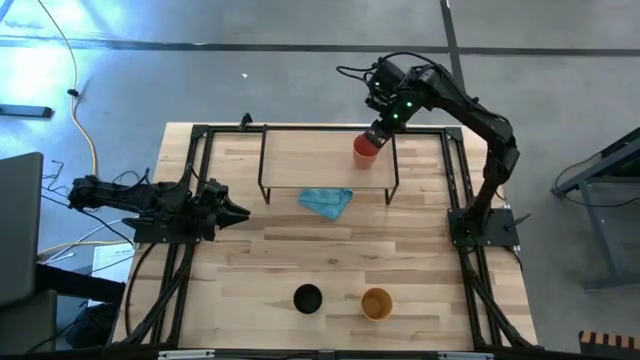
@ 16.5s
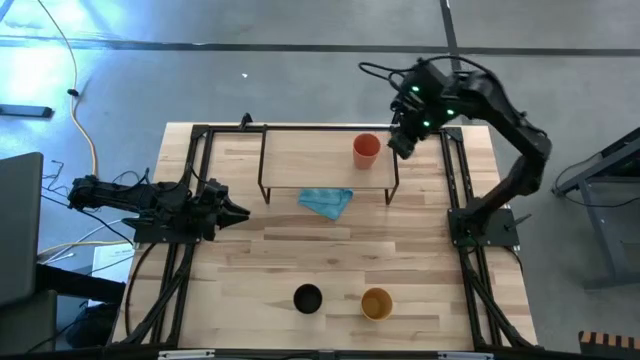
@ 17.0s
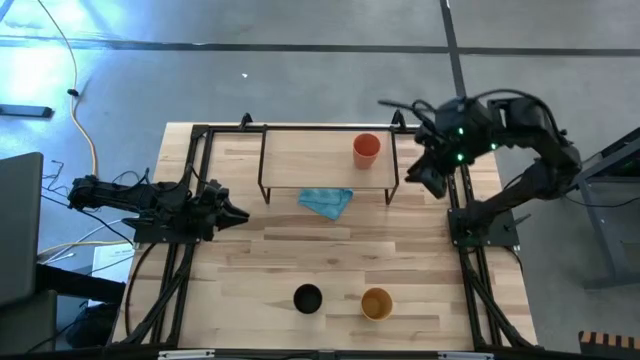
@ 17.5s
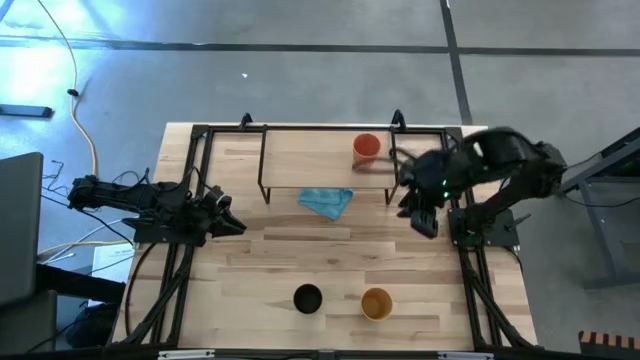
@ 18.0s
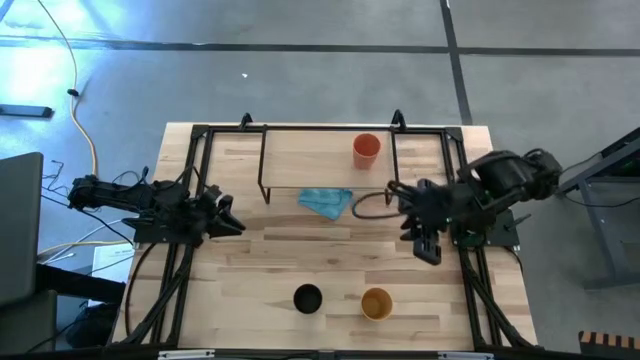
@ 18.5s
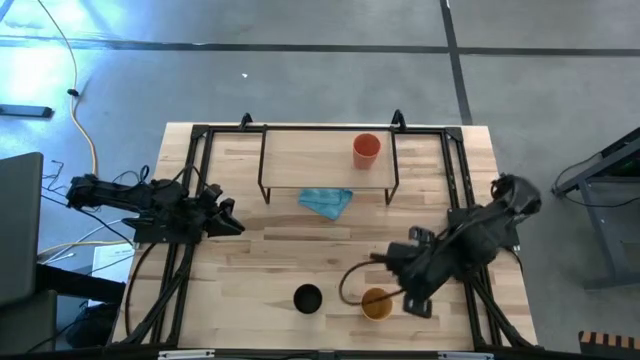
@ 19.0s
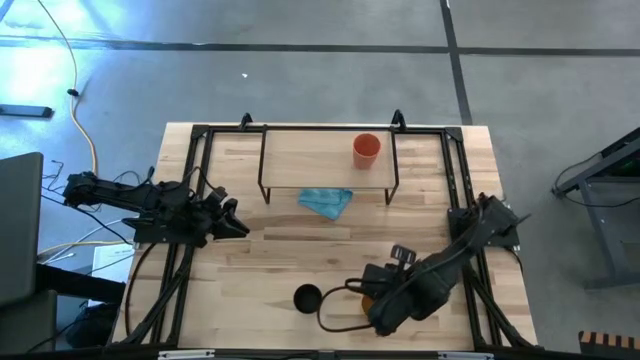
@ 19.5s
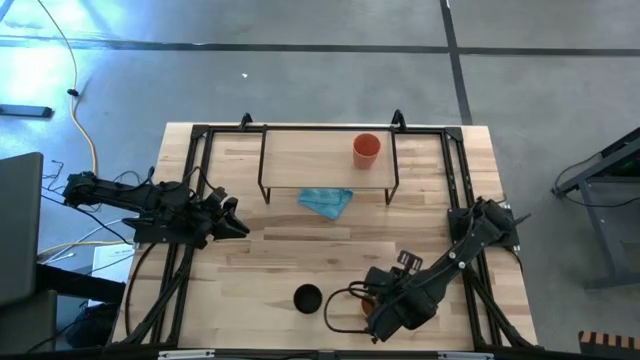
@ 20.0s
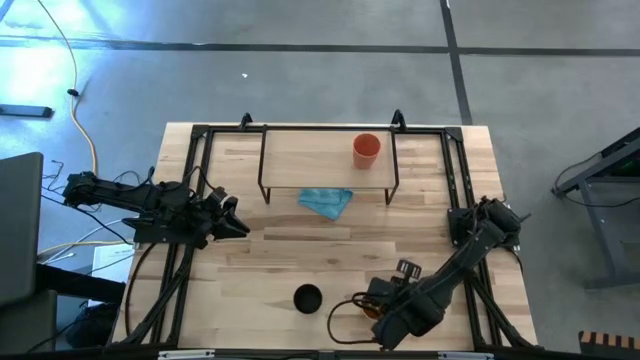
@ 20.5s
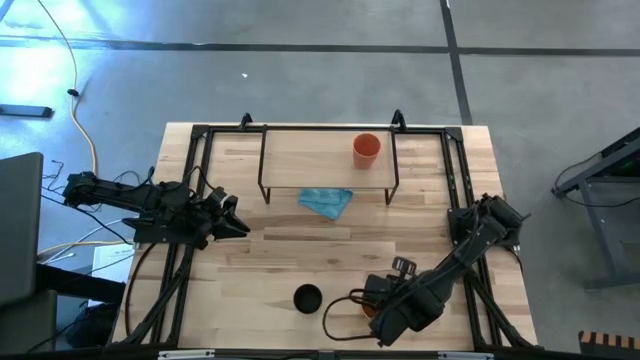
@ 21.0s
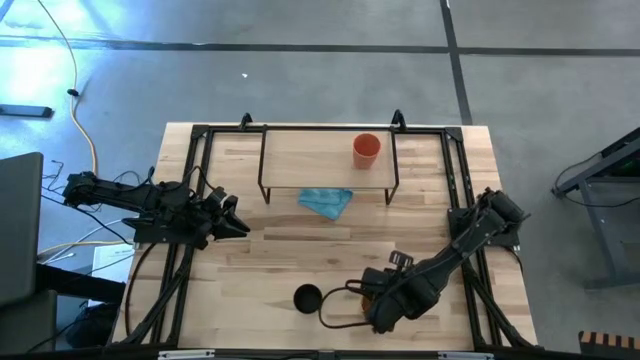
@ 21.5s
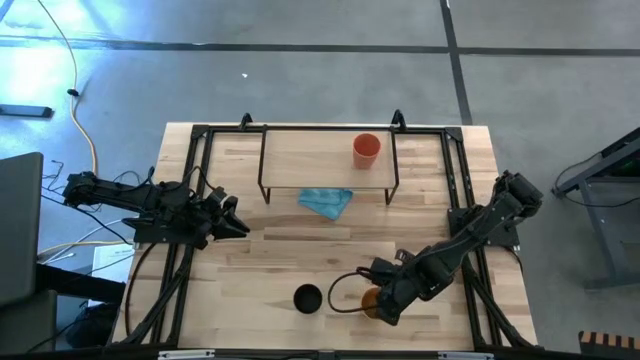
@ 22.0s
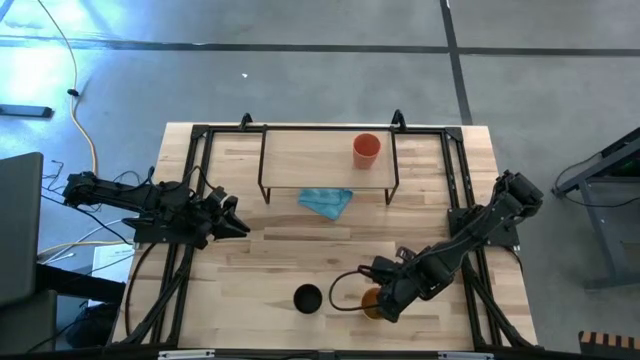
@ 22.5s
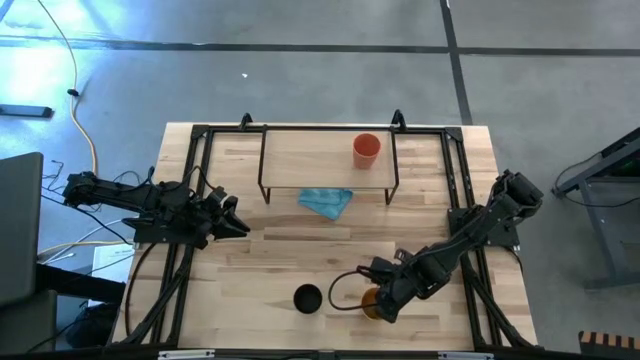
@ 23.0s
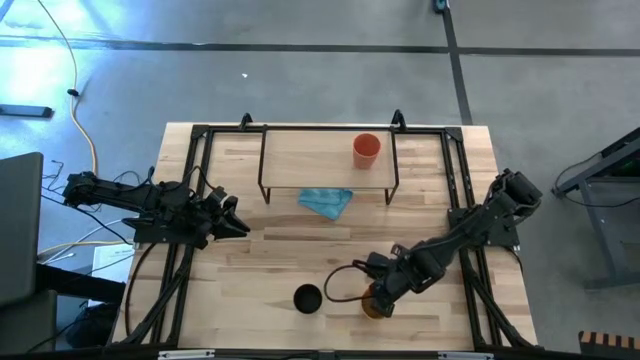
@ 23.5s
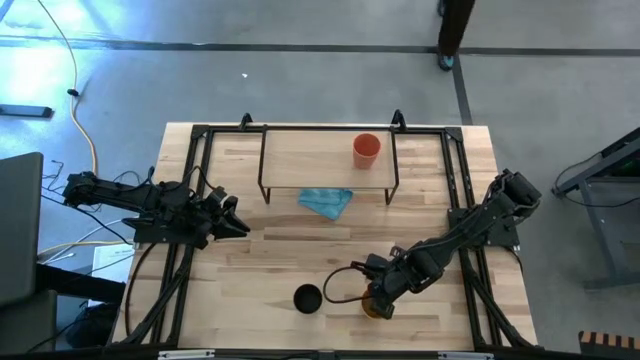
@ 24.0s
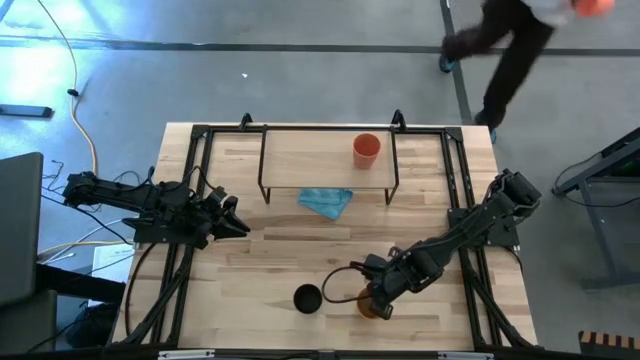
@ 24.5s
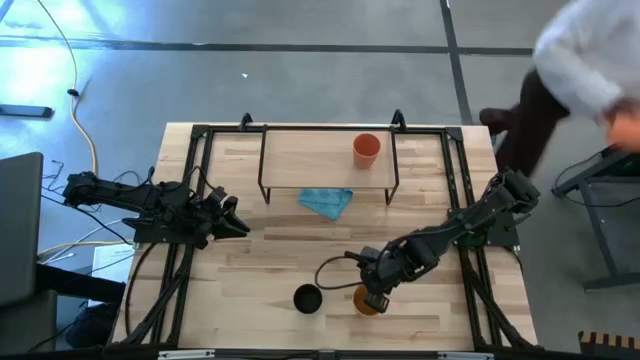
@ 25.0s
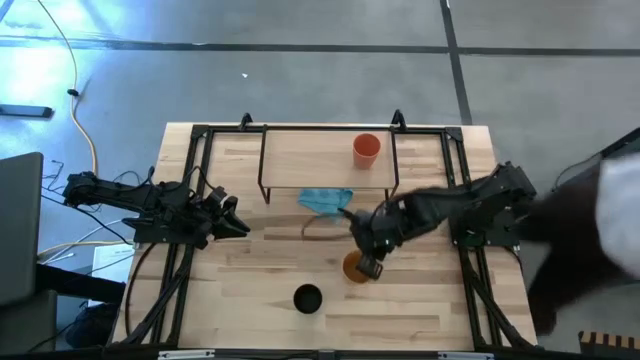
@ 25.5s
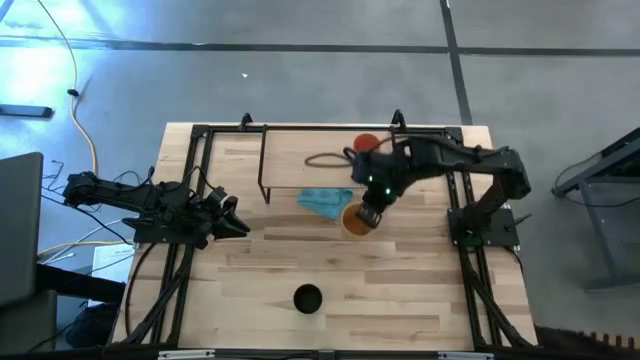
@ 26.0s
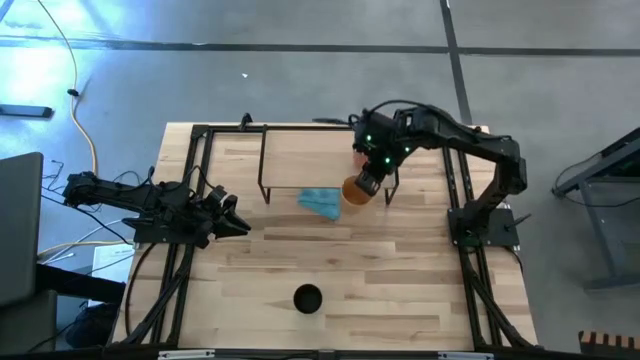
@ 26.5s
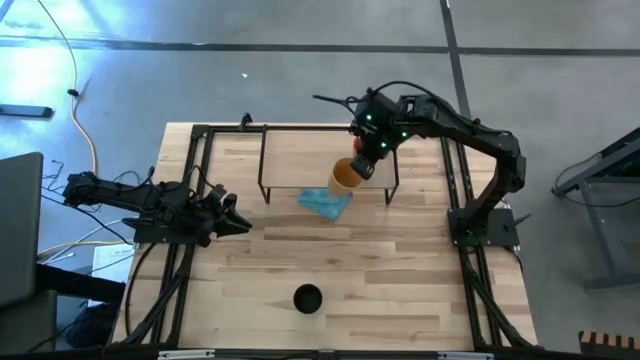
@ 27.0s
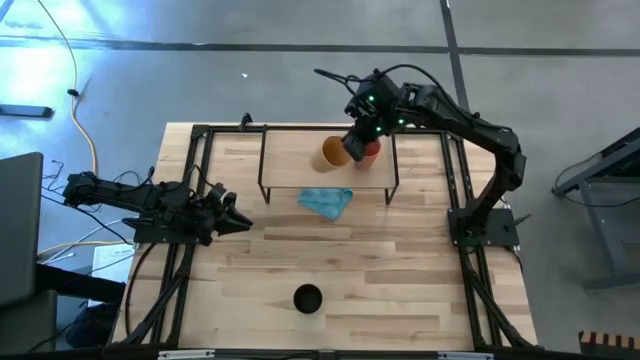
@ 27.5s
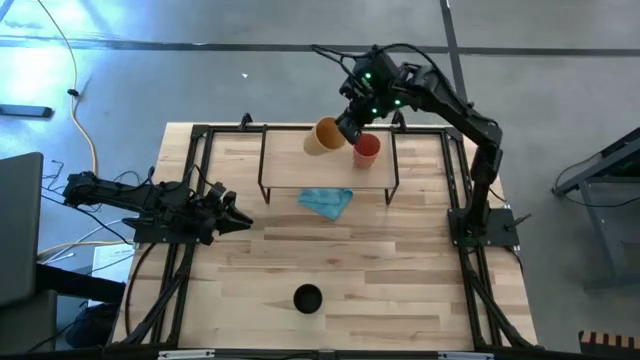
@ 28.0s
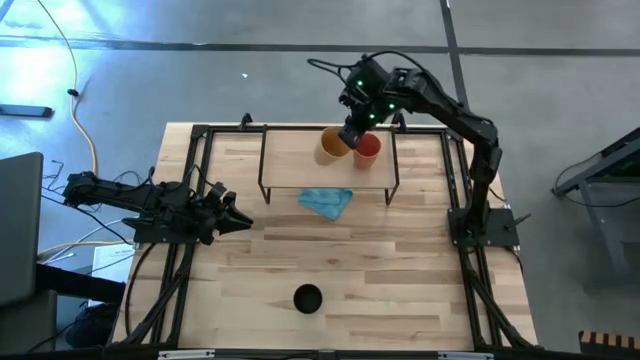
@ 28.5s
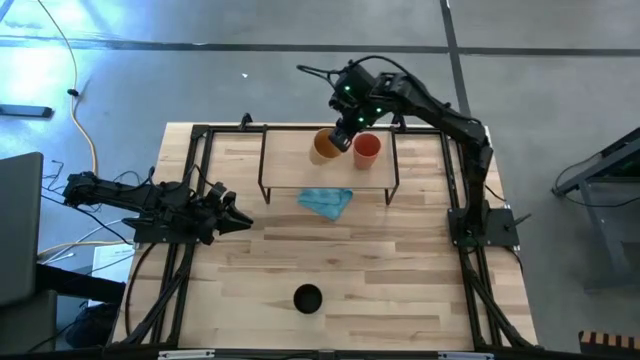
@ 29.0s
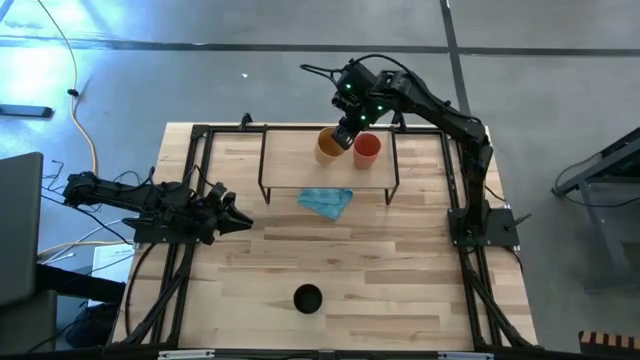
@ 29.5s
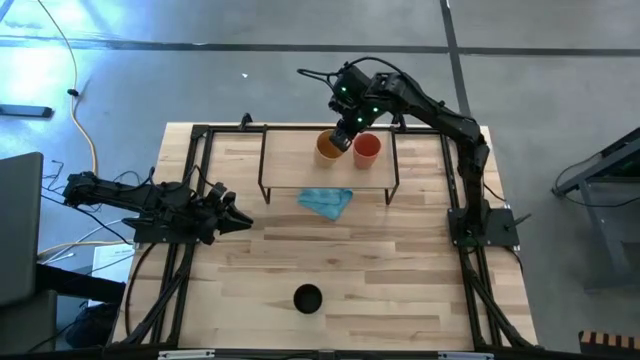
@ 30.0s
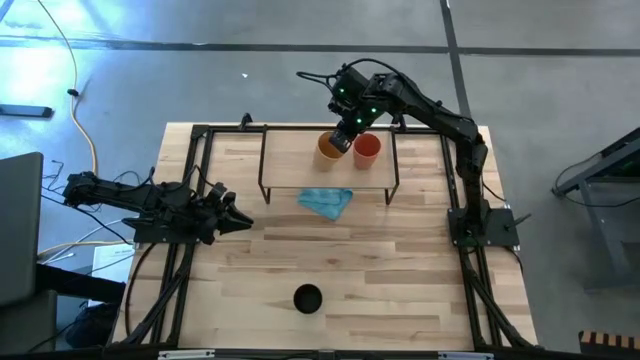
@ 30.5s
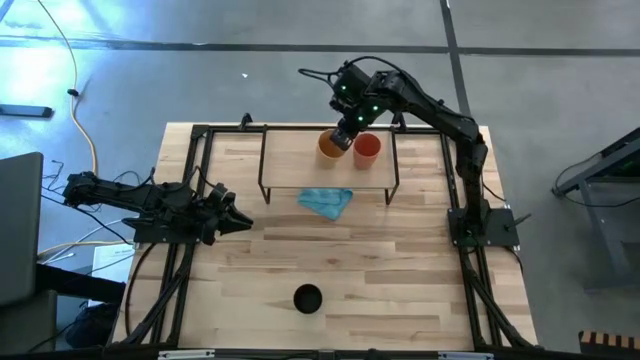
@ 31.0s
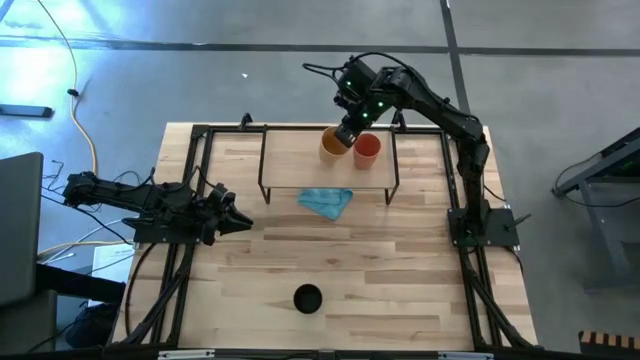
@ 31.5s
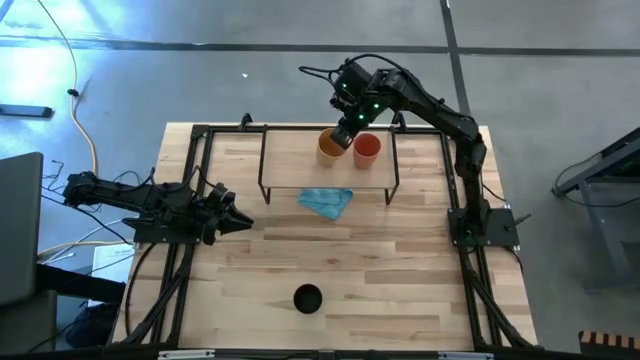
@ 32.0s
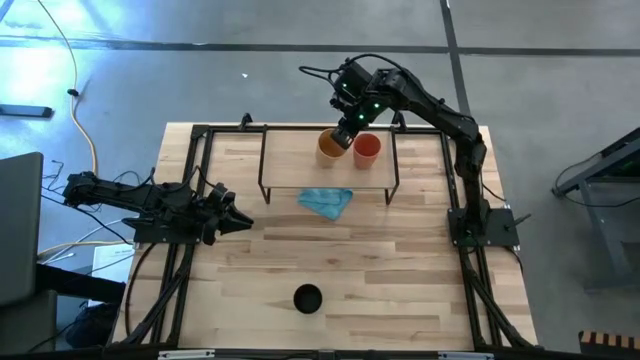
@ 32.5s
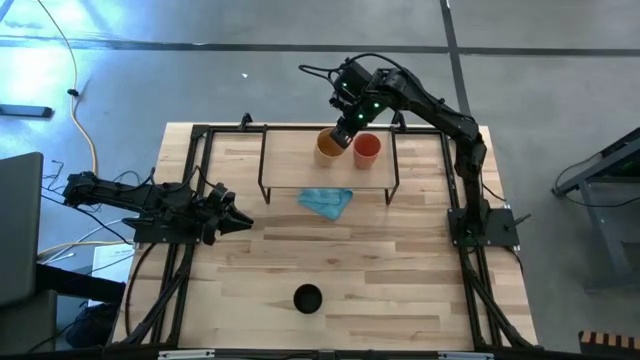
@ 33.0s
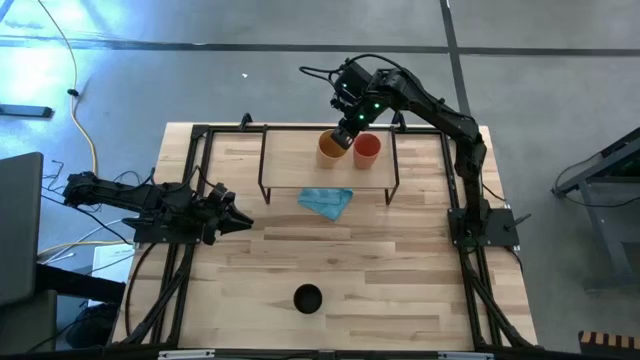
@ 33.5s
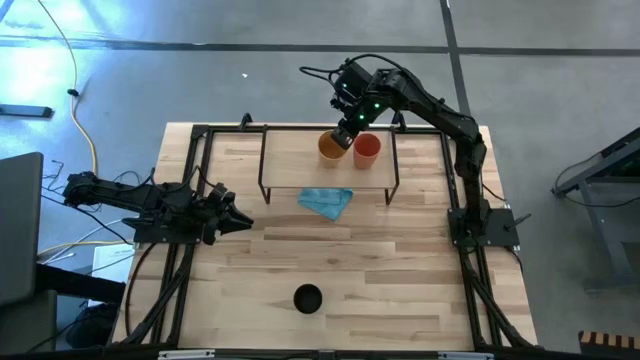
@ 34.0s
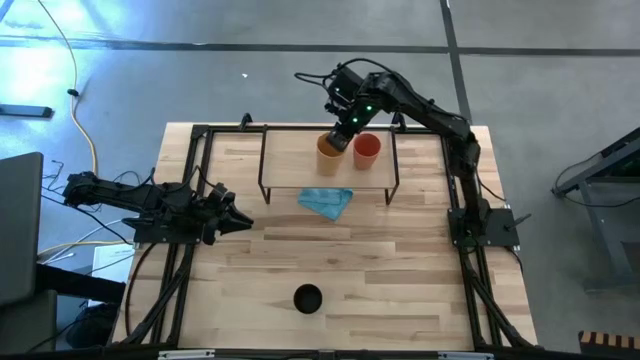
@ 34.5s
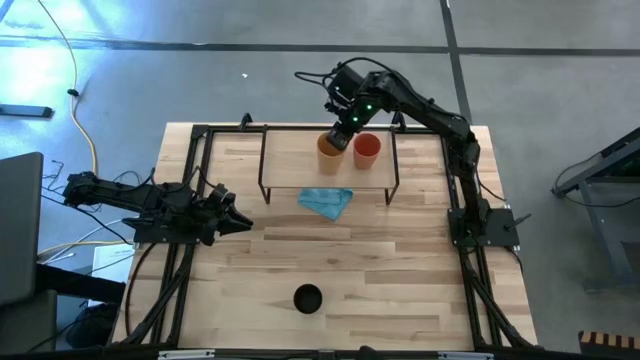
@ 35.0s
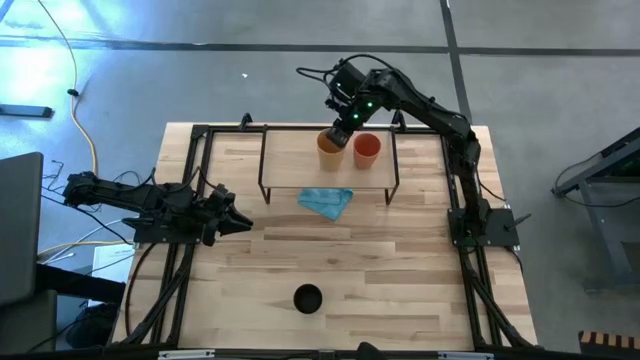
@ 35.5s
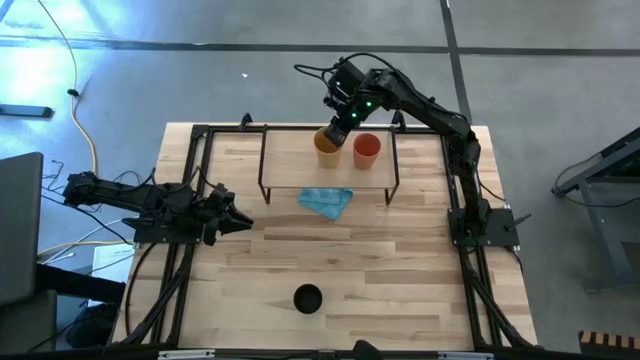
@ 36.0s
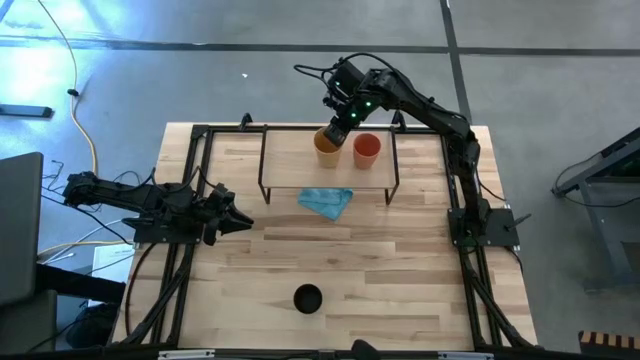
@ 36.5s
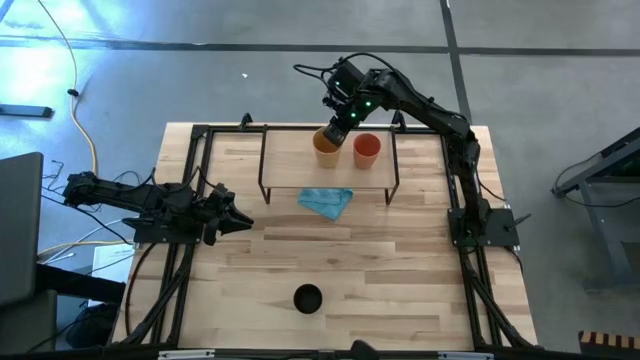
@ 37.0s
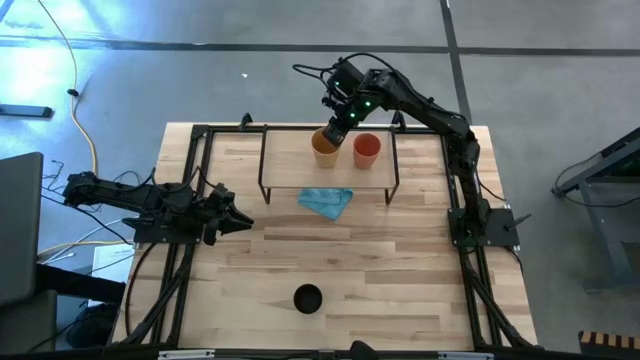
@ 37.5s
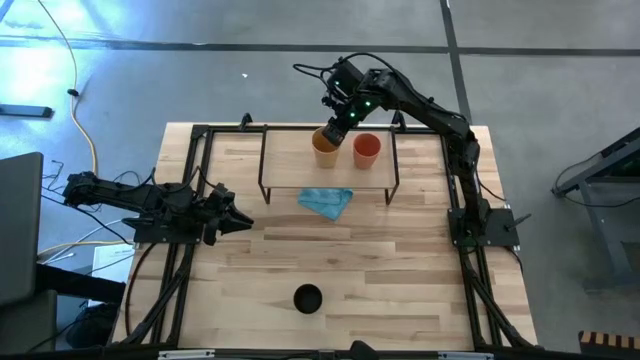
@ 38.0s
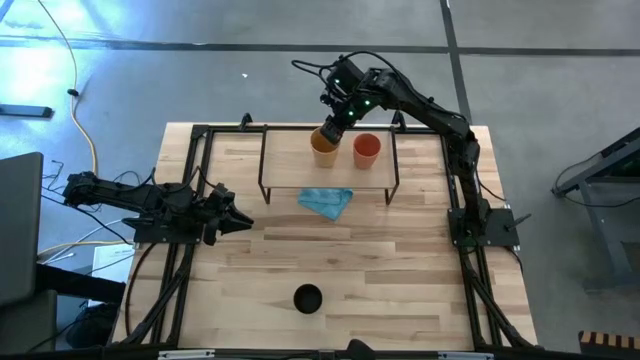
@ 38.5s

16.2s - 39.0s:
Task: Stack small to large cups/mugs on shelf
Put the yellow cup on the shelf
